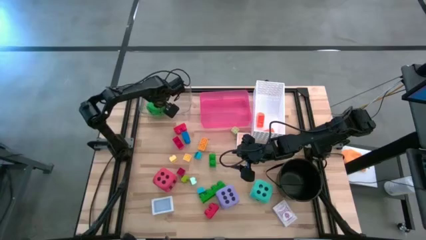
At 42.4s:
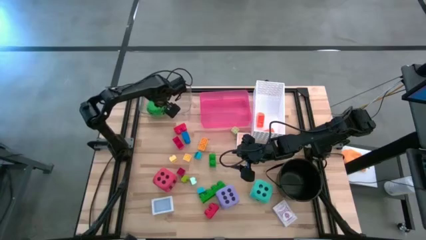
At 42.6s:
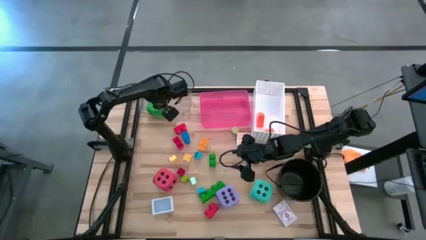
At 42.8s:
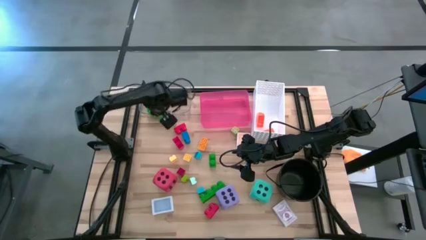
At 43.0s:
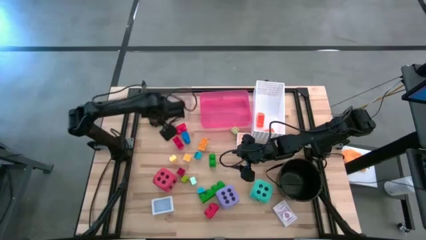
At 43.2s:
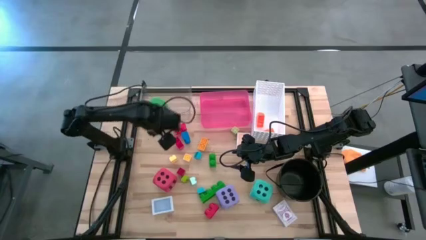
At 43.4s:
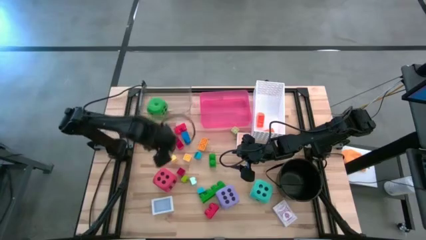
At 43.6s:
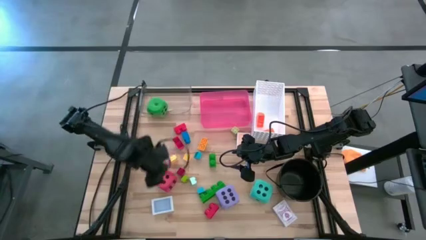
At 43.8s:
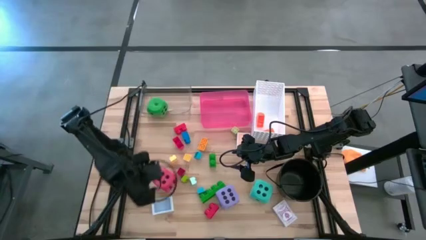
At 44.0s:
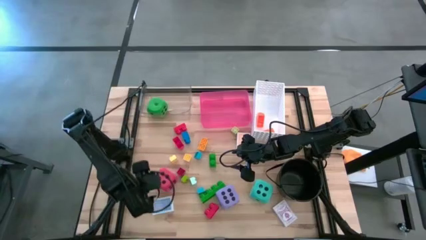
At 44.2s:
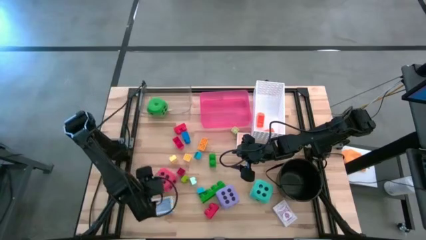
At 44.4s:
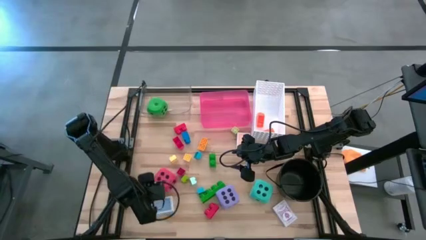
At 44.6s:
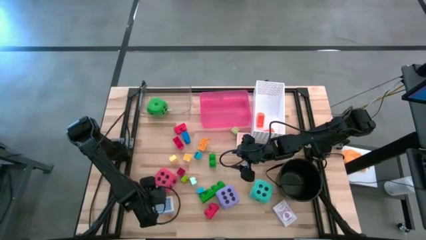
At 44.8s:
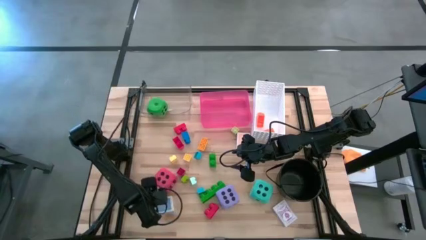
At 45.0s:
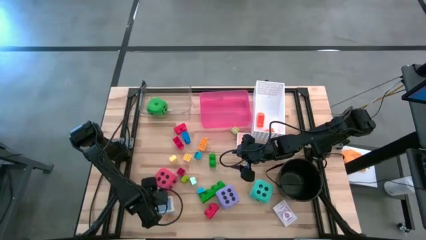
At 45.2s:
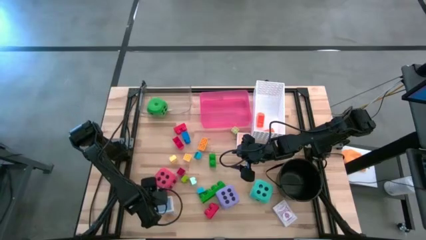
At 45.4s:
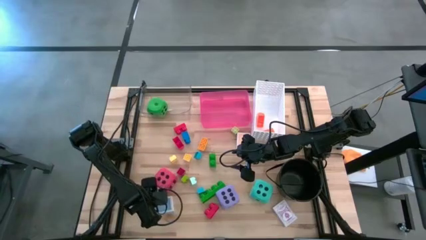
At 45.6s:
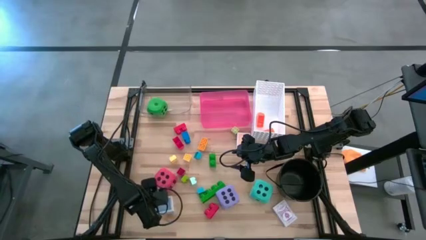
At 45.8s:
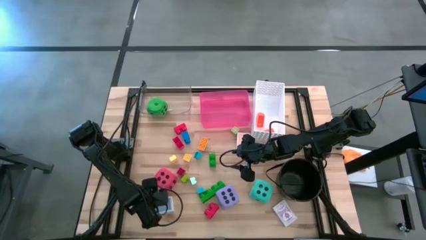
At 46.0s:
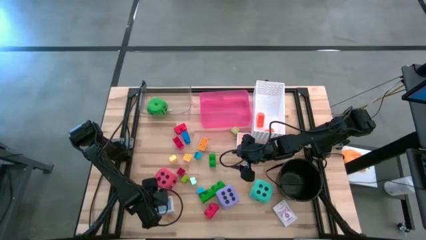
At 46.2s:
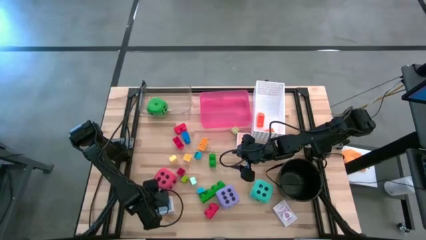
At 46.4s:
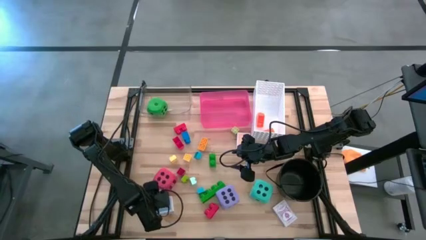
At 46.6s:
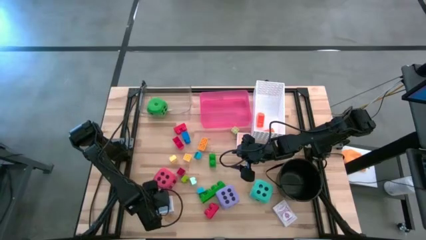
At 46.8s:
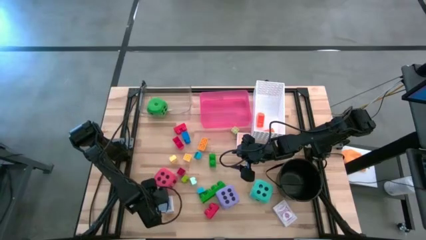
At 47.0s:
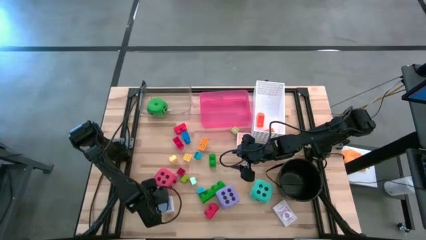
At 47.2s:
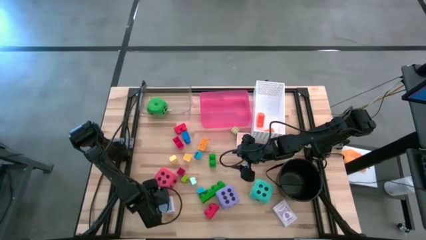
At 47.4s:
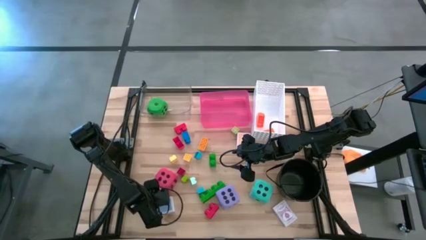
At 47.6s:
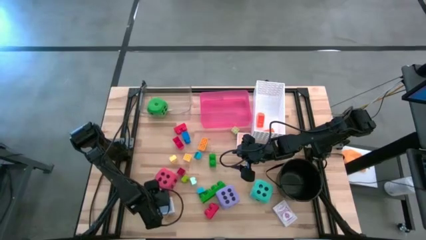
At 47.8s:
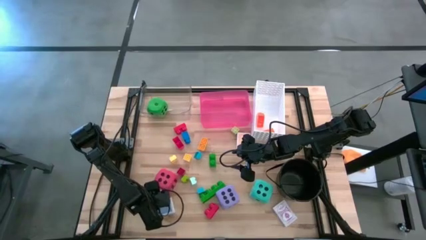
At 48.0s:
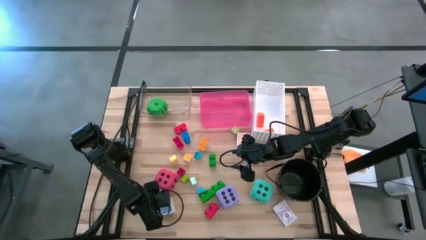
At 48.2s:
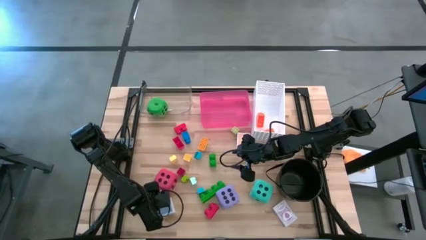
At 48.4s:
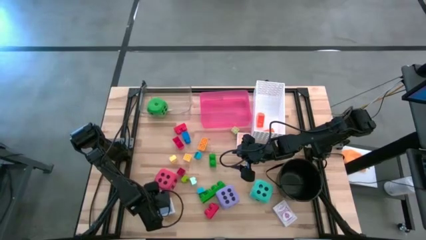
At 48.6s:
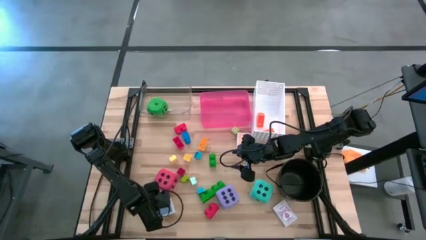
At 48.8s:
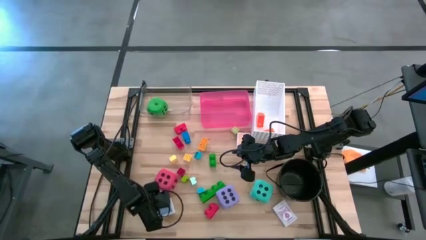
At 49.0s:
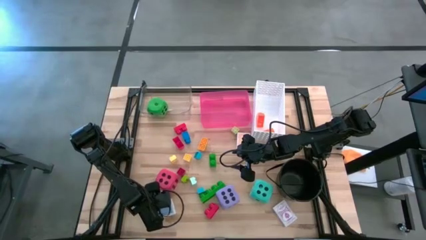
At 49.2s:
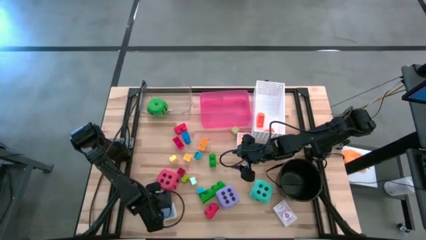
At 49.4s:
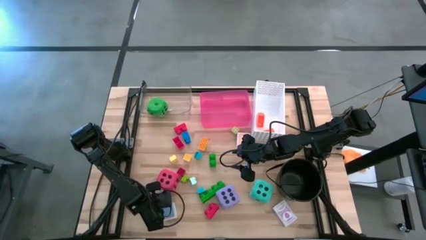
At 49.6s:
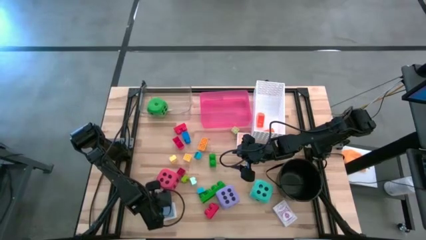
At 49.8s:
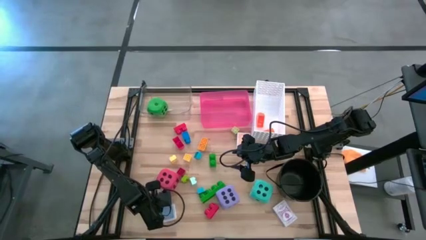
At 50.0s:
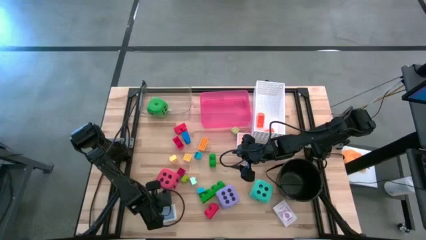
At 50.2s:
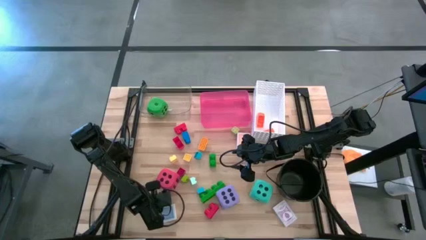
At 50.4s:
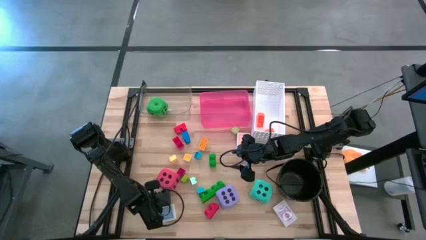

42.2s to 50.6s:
Task: Pick & Place Toys
Put the blue deck of cards into the pink bin

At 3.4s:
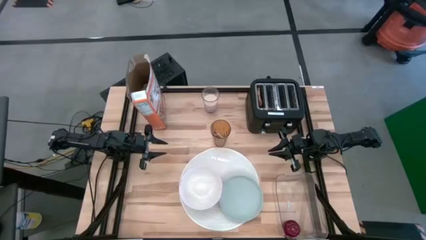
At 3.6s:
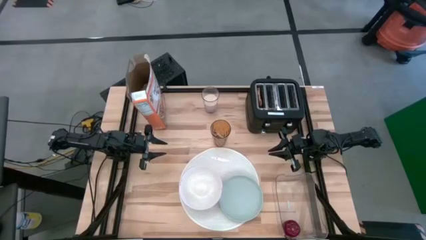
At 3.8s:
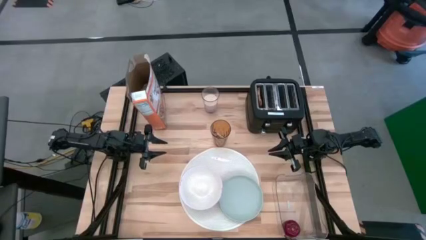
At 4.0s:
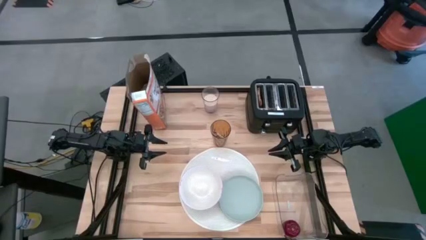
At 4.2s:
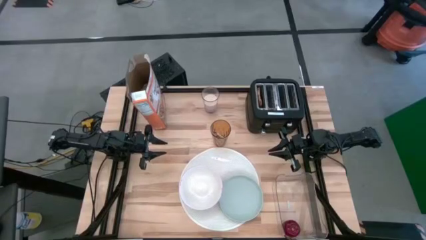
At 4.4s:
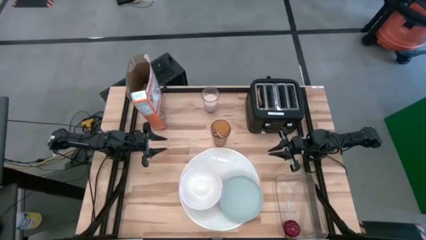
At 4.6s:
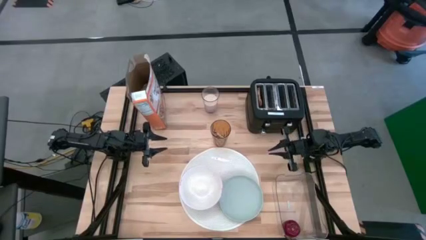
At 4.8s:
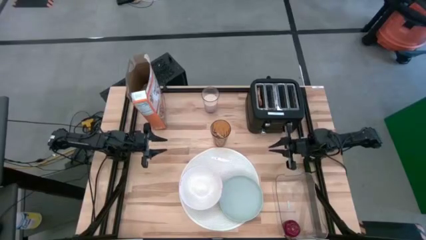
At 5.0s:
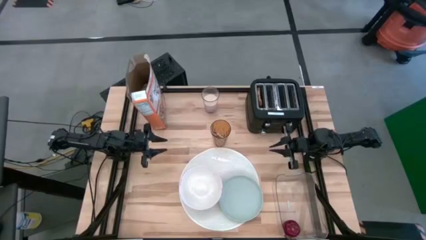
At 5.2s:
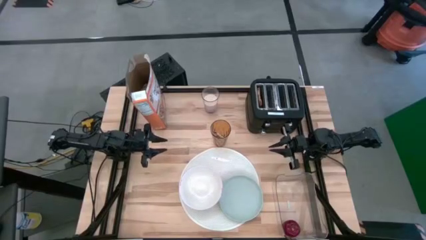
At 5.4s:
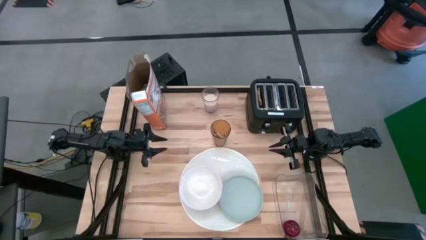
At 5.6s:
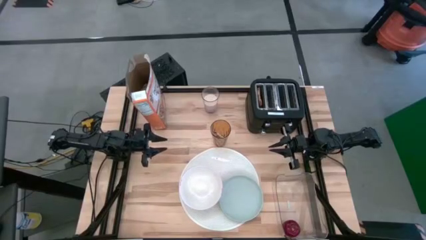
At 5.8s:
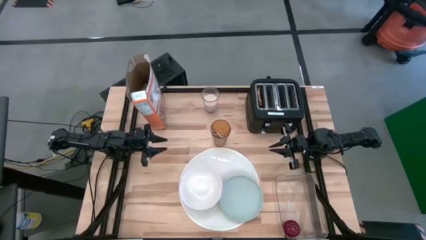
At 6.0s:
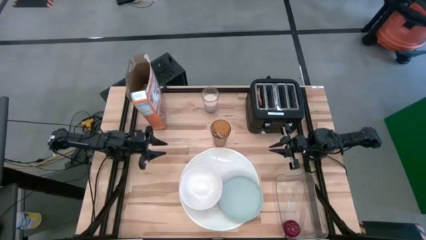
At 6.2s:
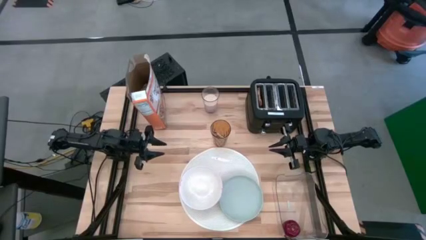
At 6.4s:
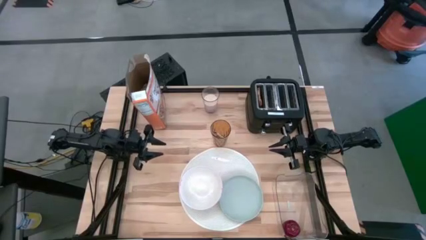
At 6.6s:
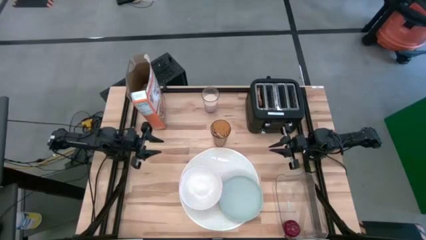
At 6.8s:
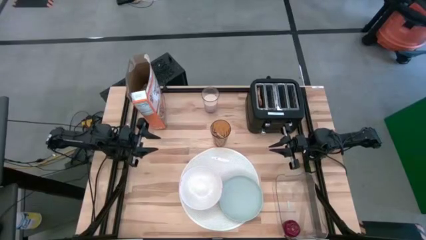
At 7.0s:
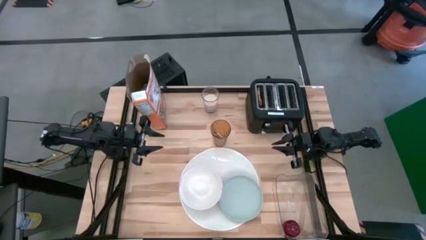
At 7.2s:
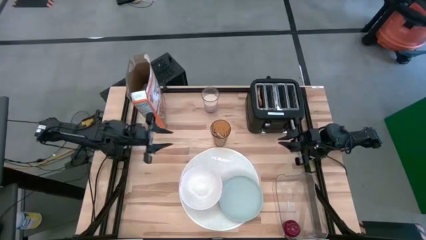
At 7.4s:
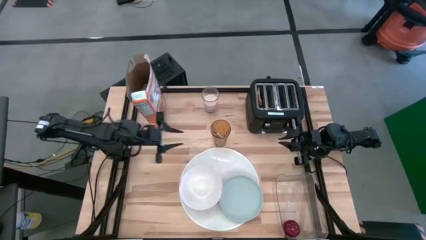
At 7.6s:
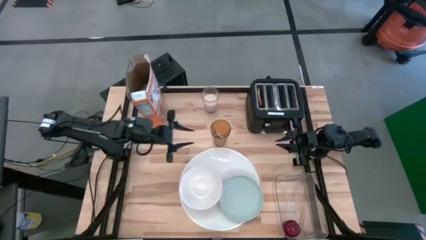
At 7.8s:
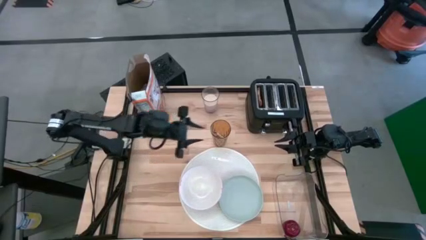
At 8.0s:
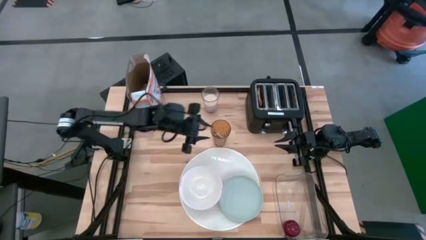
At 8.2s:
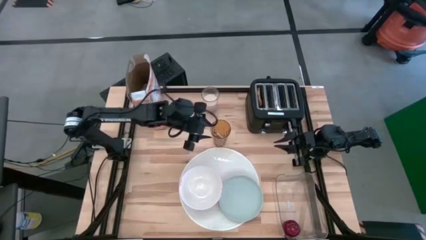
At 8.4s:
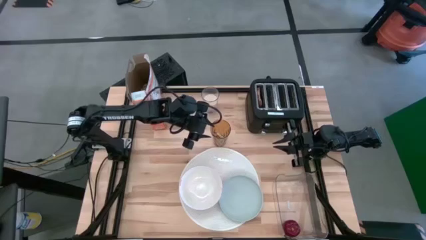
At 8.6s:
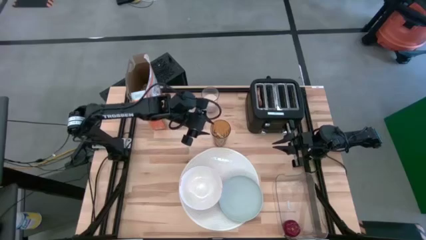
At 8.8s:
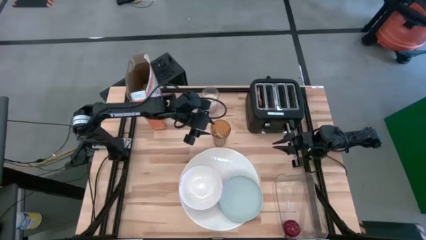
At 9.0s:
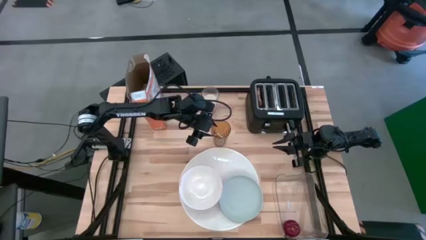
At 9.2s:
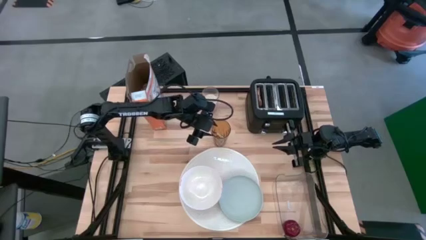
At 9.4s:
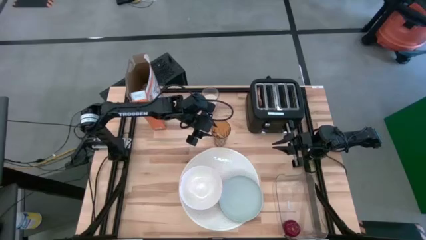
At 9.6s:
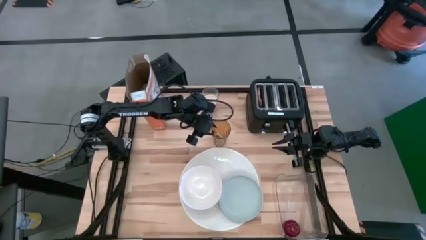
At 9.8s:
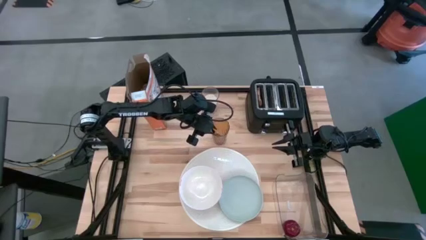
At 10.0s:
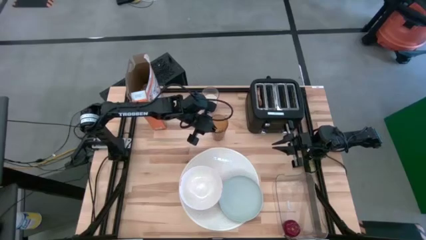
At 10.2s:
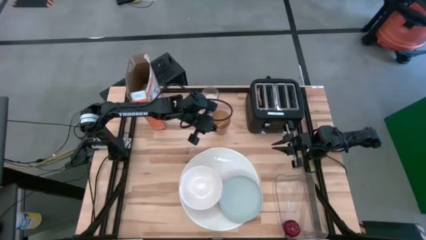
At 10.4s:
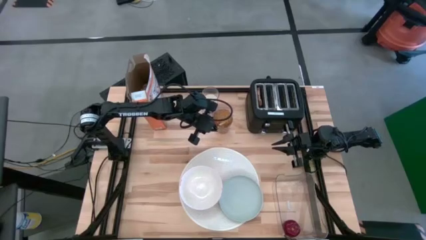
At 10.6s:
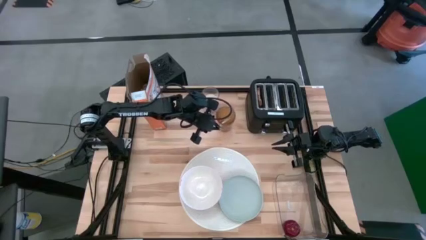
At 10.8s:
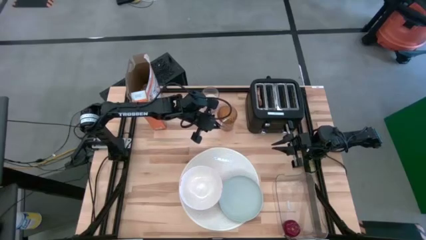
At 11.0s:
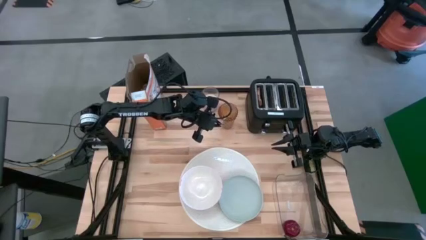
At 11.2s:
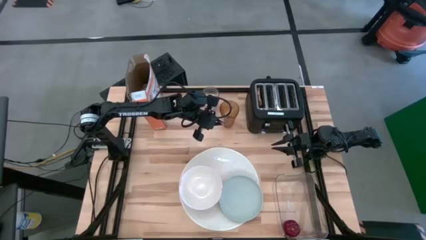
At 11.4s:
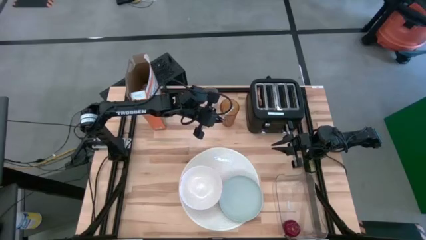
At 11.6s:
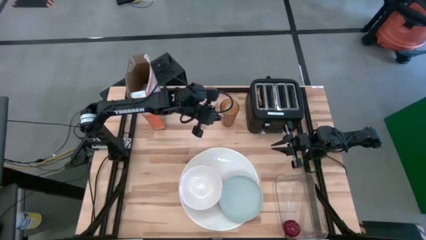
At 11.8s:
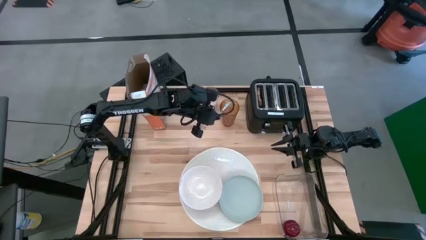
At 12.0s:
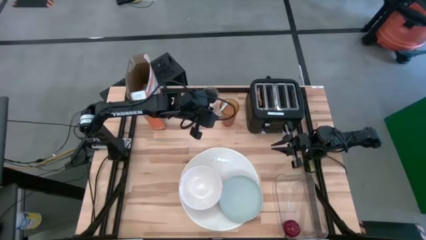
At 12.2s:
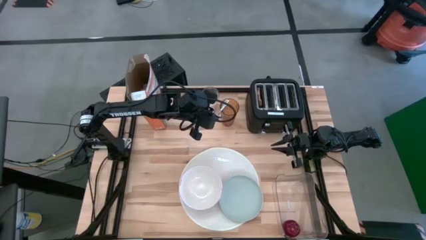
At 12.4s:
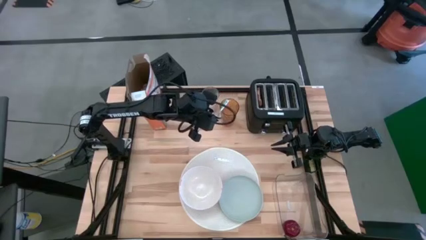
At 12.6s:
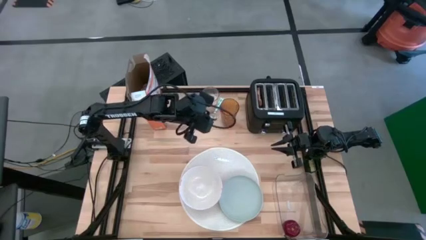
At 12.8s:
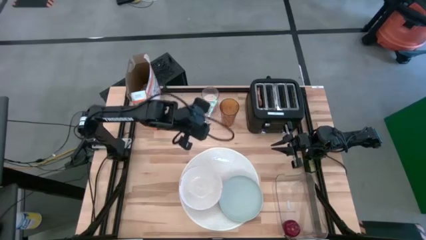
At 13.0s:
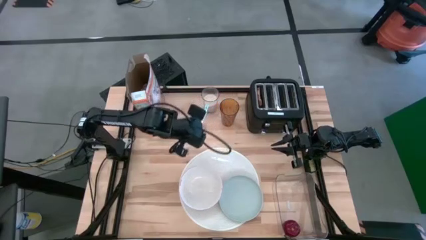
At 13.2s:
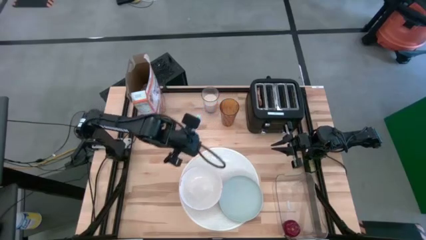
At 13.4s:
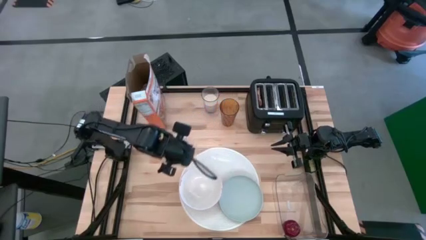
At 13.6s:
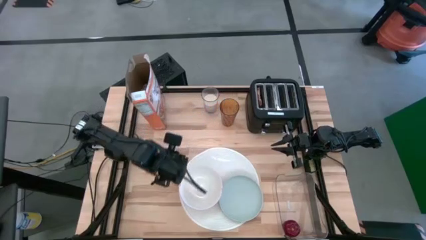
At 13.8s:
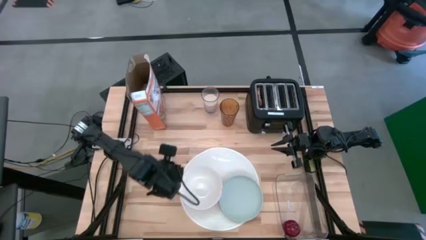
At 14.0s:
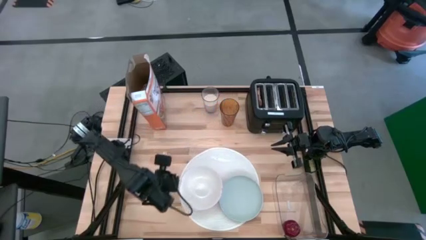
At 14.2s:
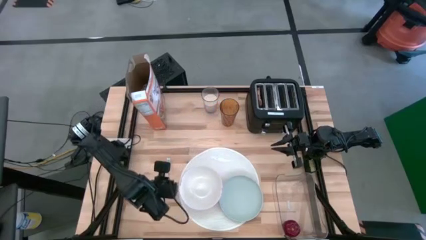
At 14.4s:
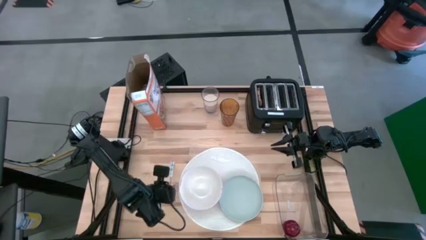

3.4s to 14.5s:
Task: Arrange a breakfast setting
Move the spoon to the left side of the white table mat
